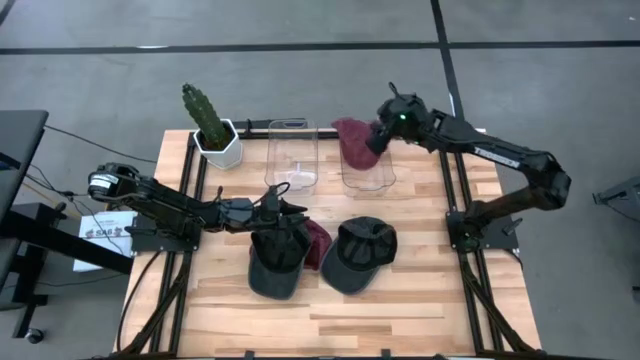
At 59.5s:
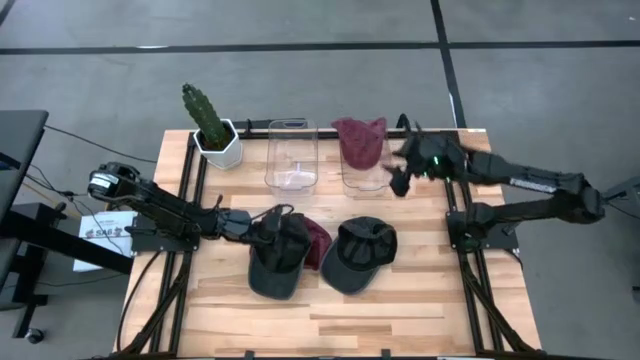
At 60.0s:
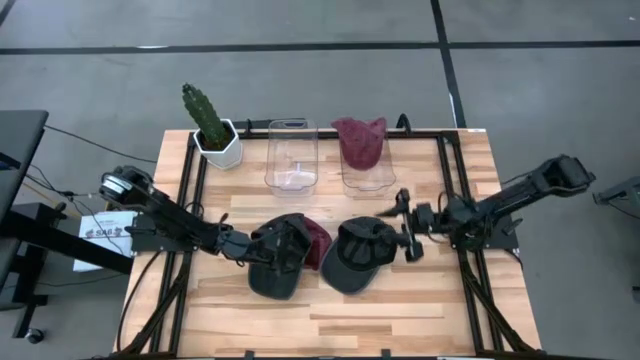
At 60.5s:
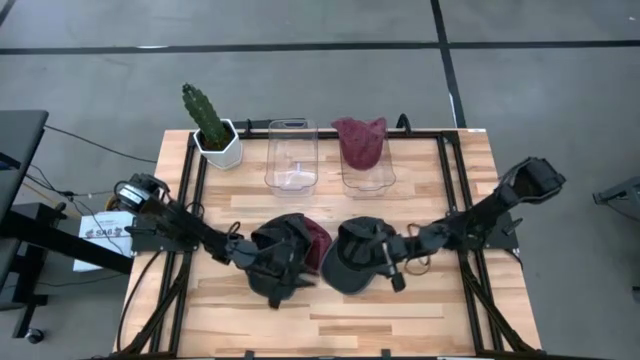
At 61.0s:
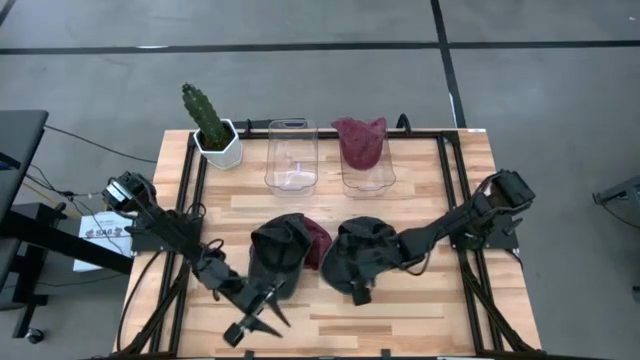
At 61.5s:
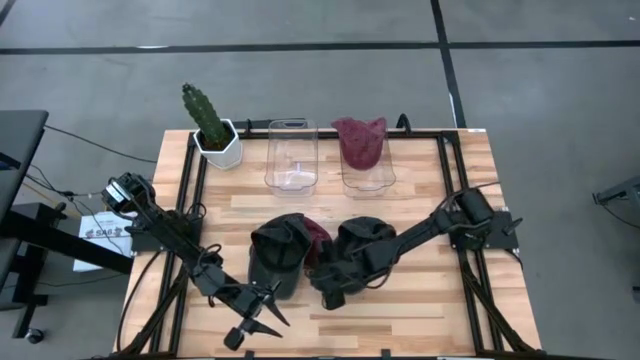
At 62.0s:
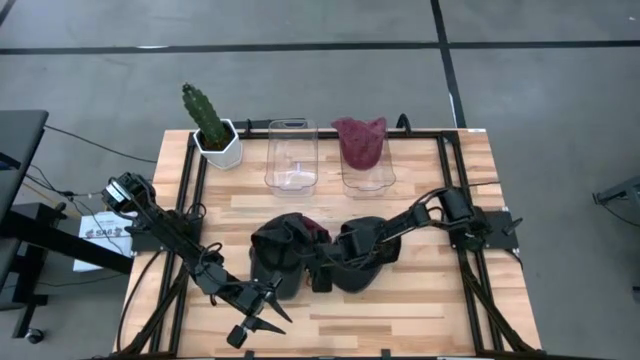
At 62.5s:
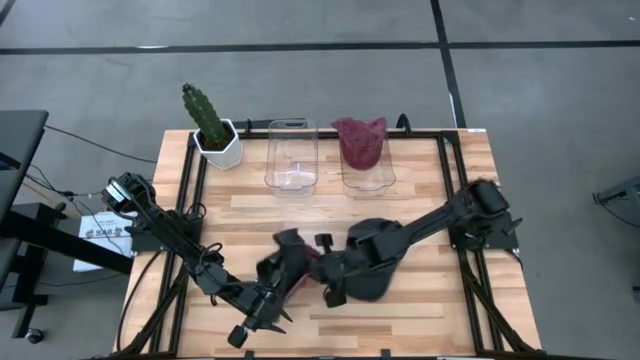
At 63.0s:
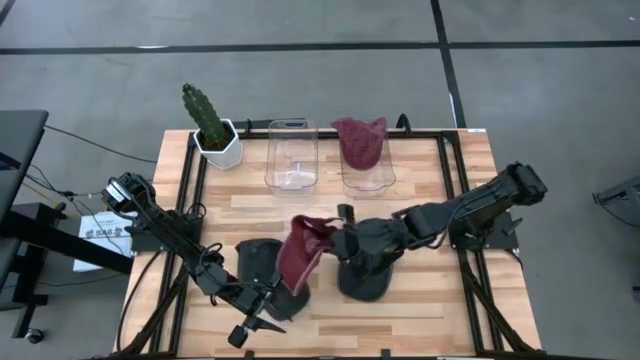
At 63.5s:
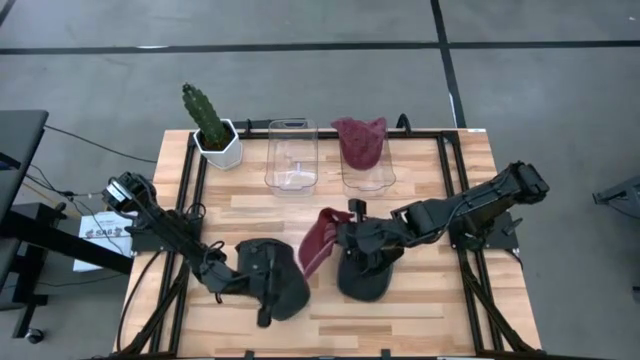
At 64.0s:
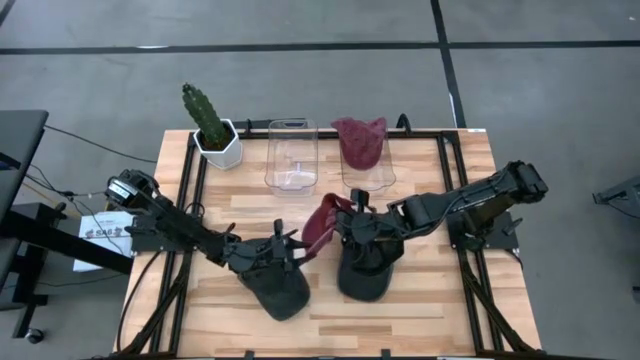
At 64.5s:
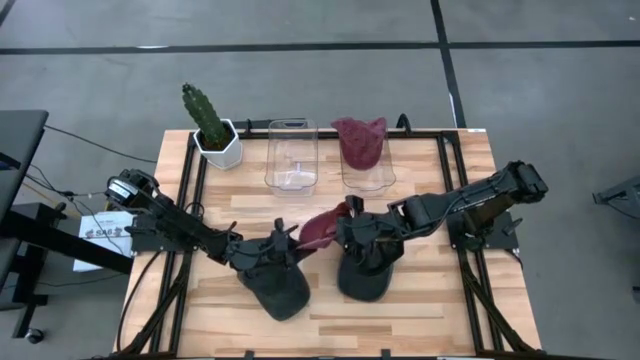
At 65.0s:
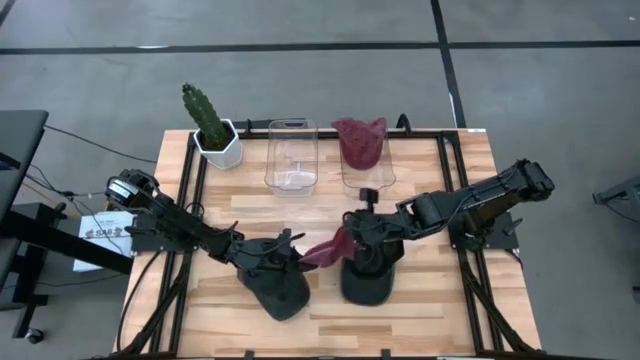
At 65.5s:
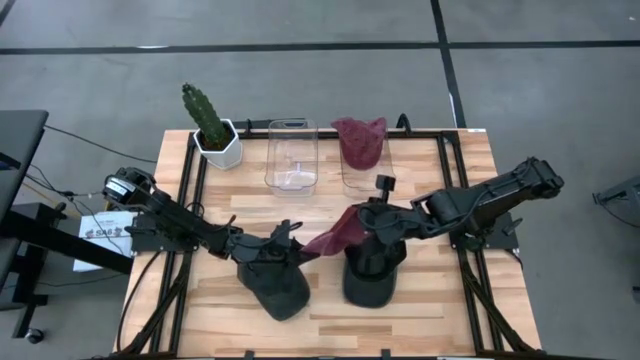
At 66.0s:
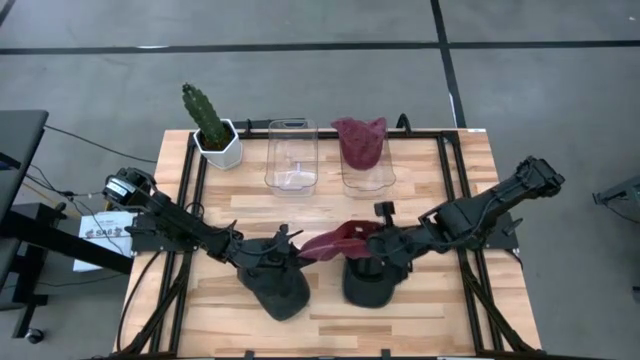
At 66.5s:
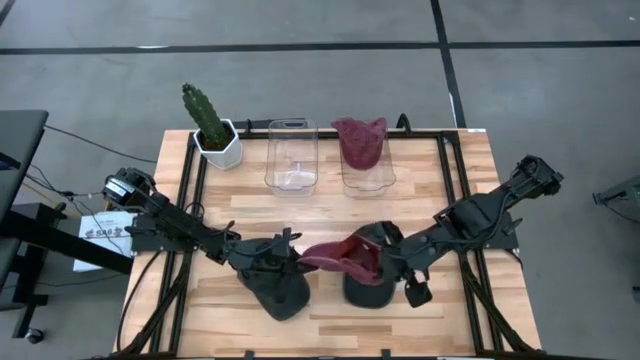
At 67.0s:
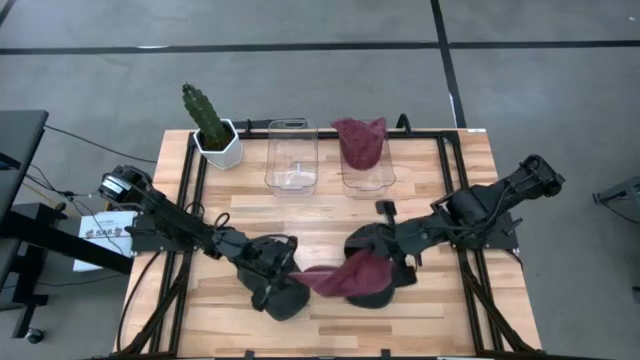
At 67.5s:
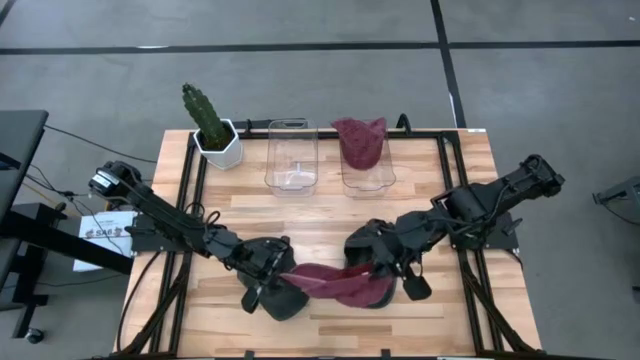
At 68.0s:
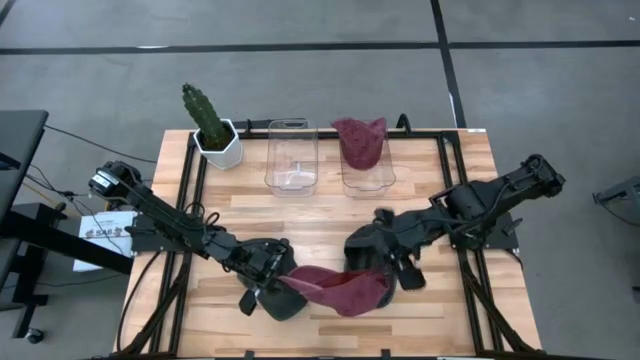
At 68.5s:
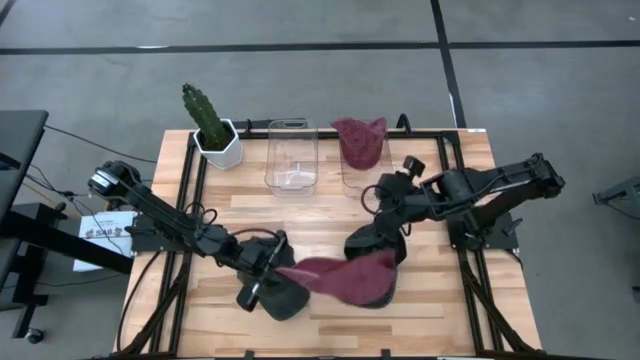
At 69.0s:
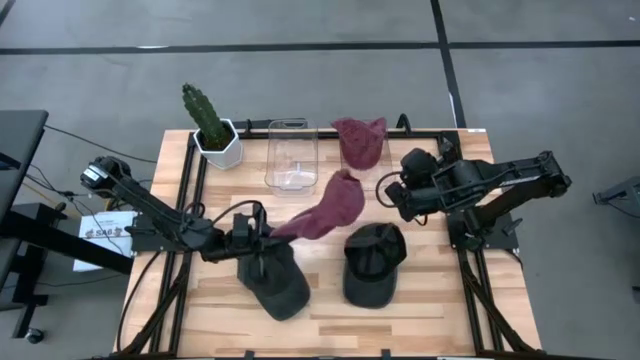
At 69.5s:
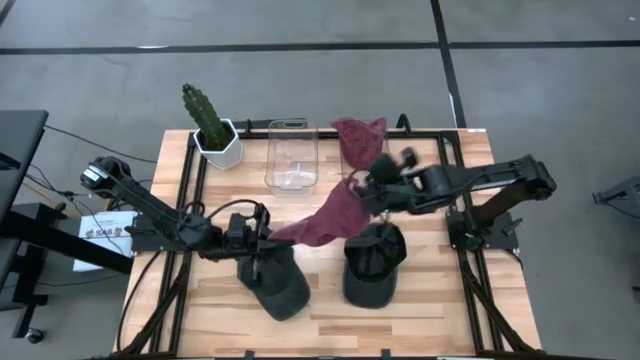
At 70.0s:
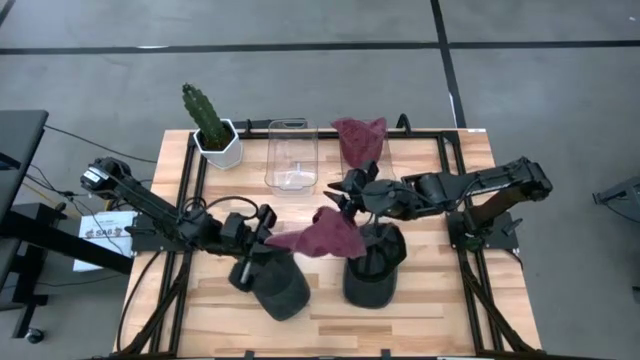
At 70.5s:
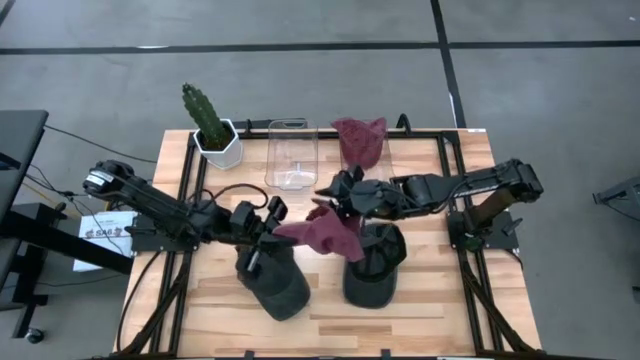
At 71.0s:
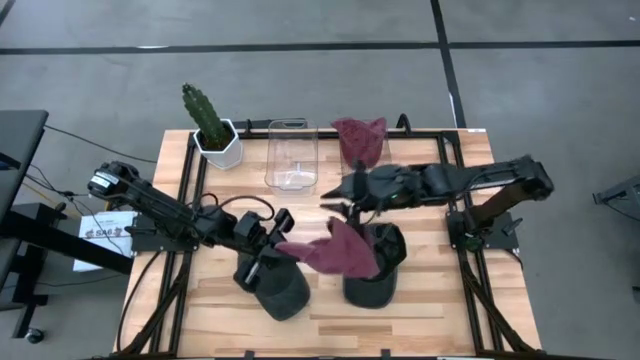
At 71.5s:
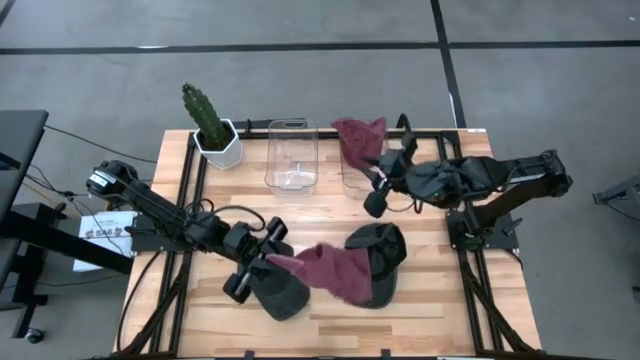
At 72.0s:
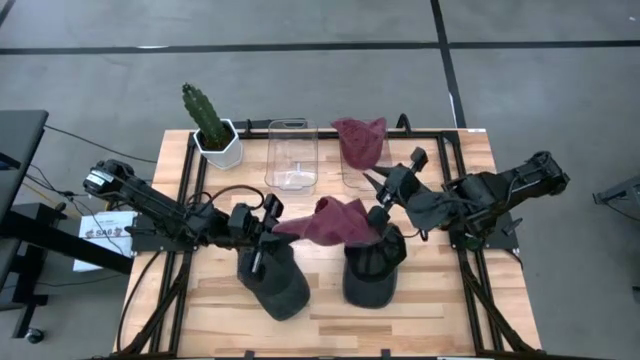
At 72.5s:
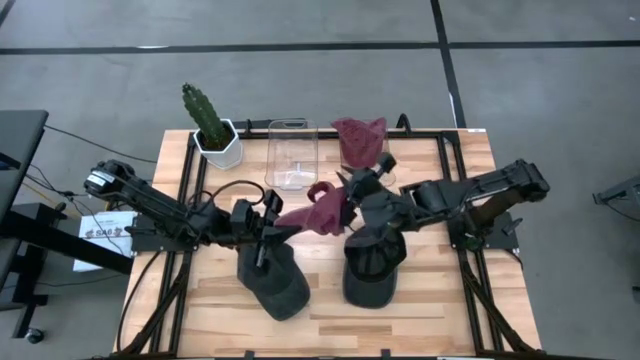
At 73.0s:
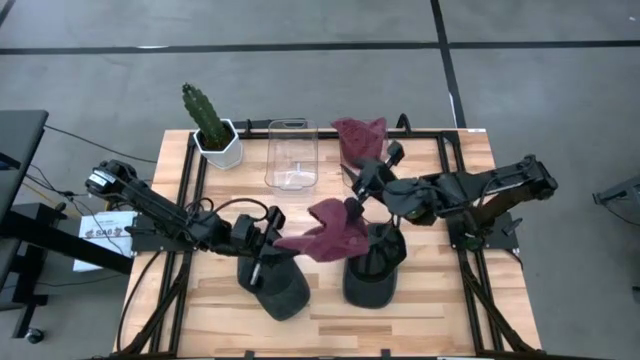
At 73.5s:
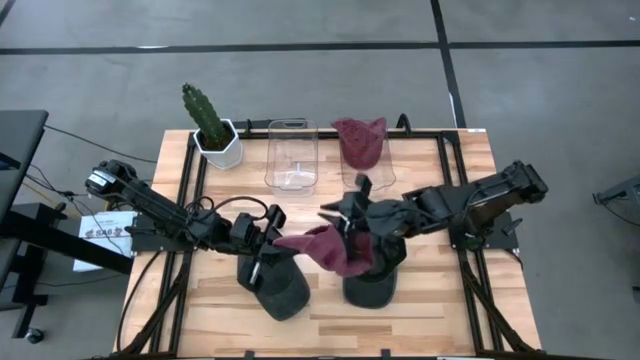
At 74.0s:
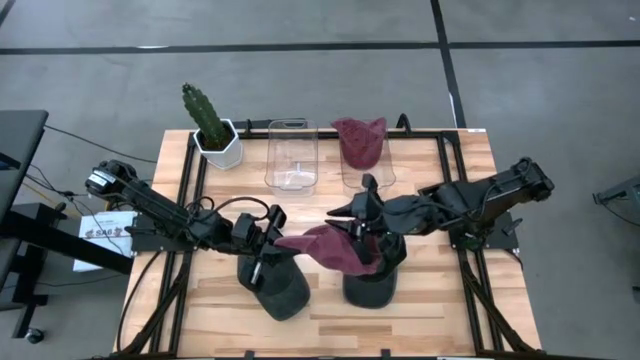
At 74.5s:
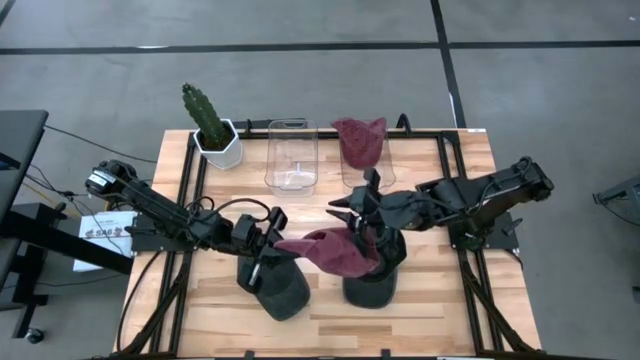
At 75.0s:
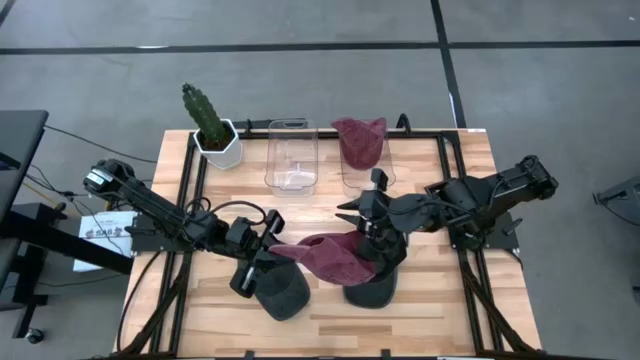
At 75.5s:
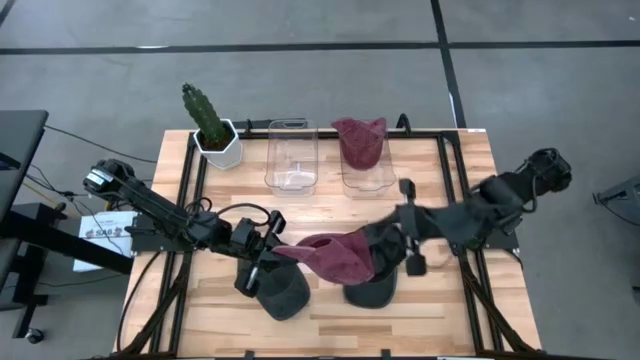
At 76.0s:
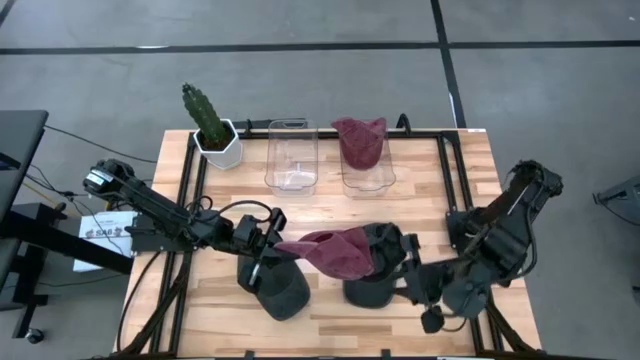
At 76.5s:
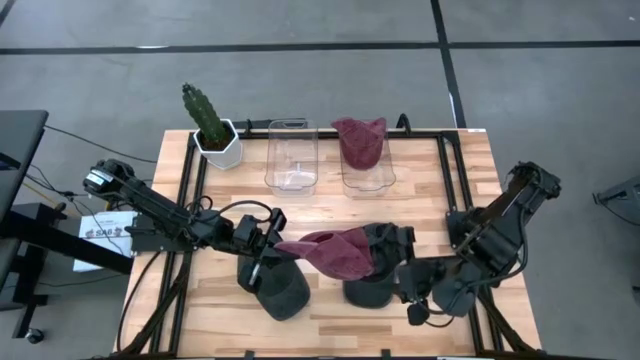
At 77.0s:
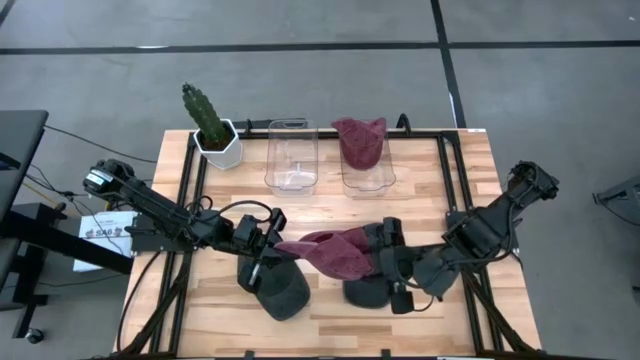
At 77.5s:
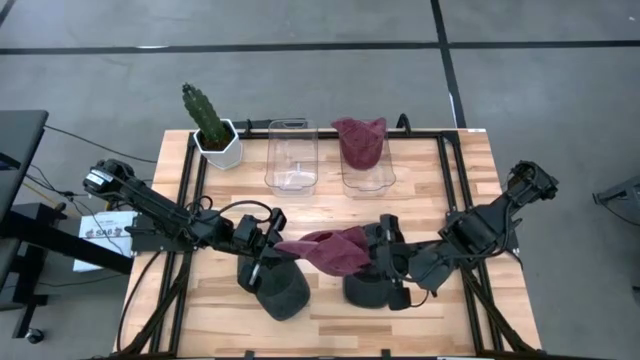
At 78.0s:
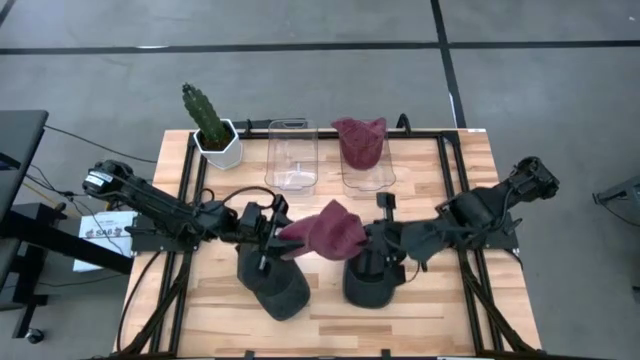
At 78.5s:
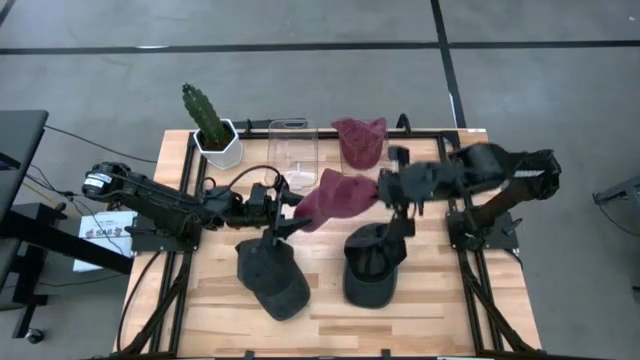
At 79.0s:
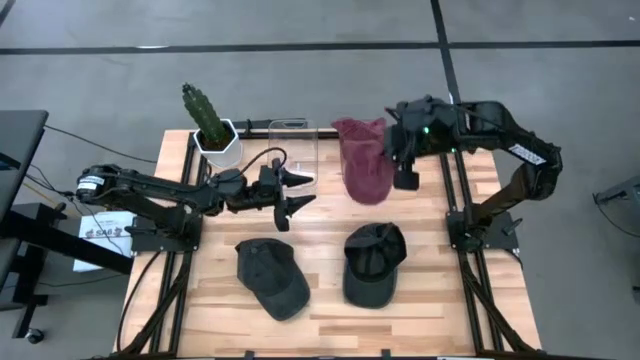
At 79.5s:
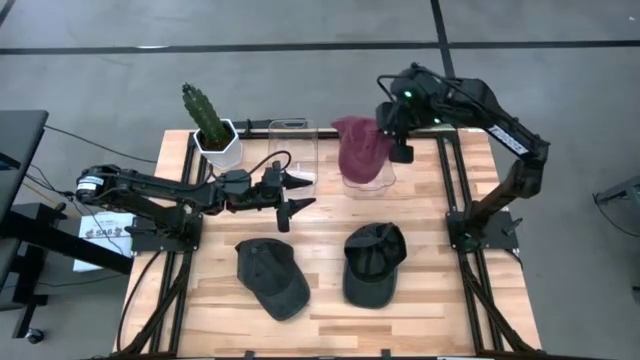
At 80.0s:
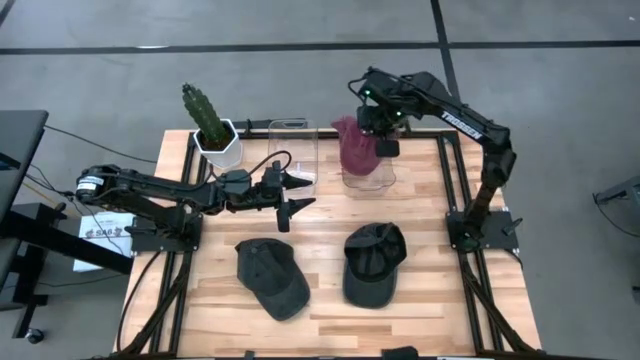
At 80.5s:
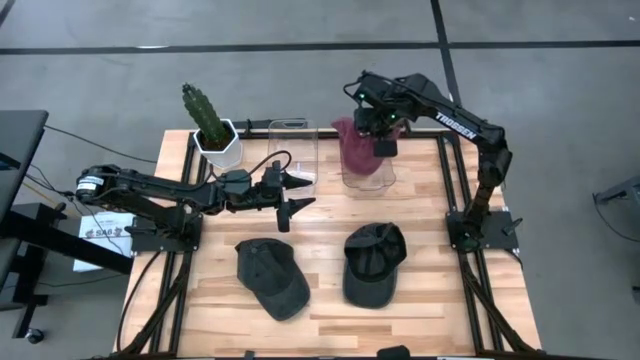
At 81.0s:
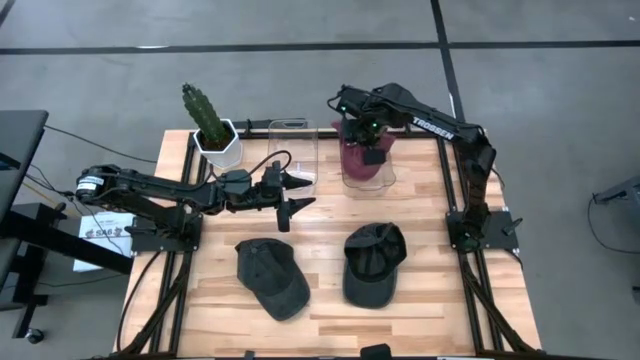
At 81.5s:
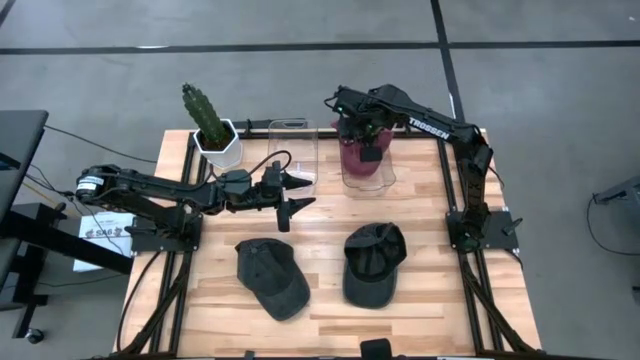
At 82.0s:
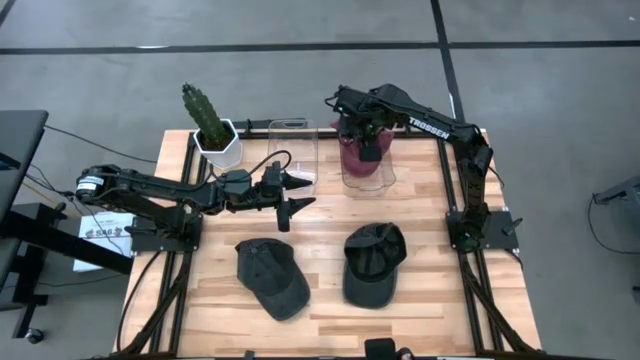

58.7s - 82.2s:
Task: Pick & Place hat
Put the red cap into the right transparent bin
